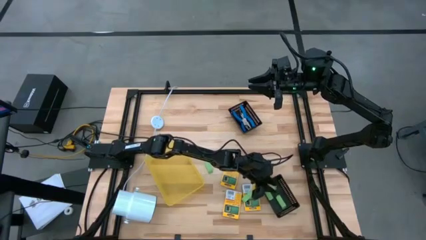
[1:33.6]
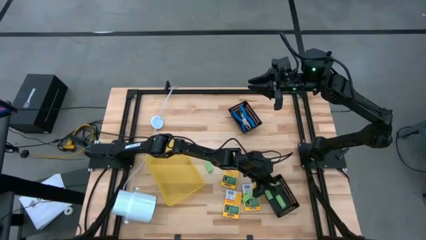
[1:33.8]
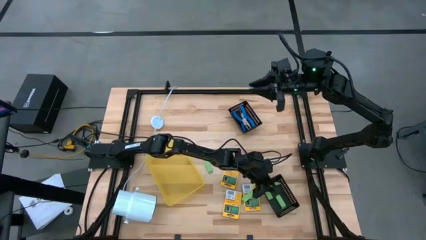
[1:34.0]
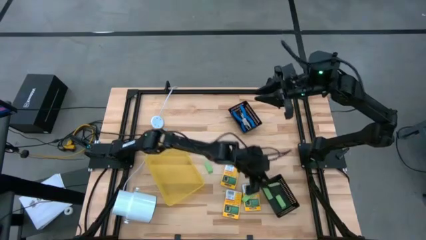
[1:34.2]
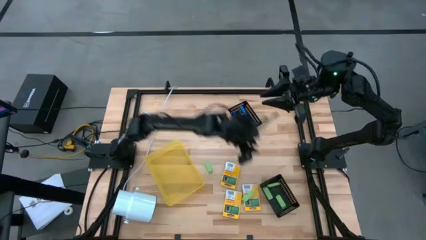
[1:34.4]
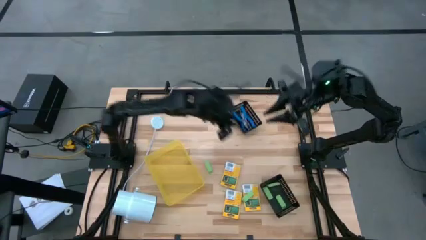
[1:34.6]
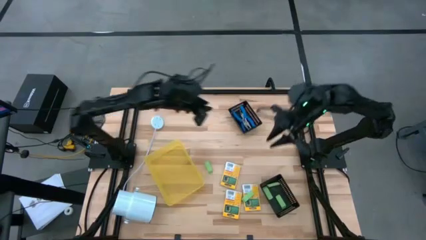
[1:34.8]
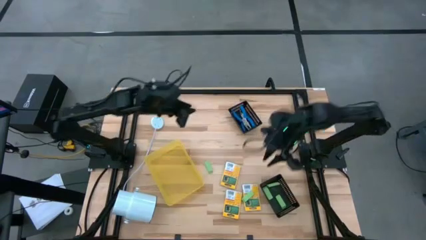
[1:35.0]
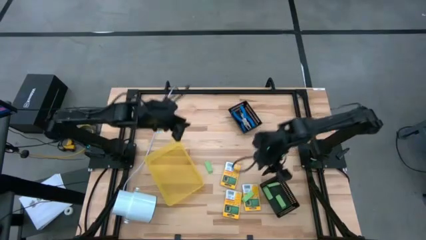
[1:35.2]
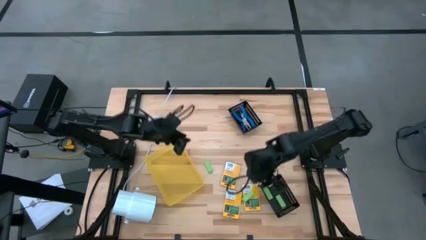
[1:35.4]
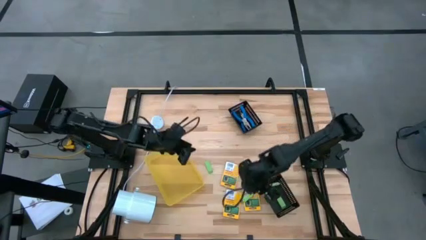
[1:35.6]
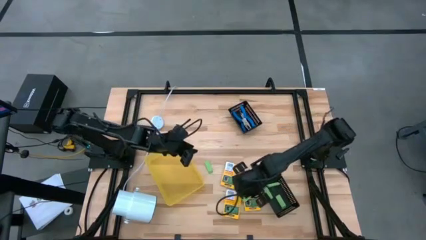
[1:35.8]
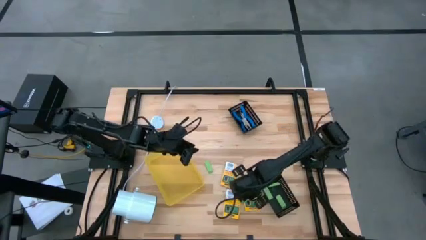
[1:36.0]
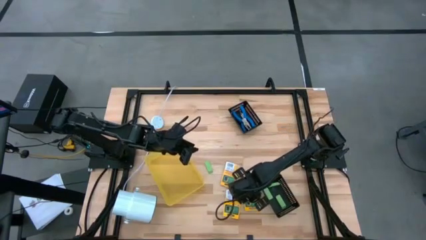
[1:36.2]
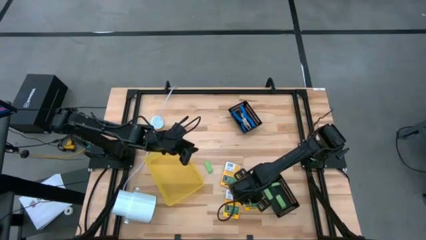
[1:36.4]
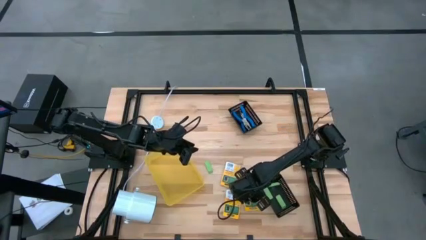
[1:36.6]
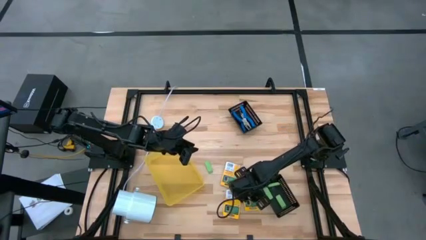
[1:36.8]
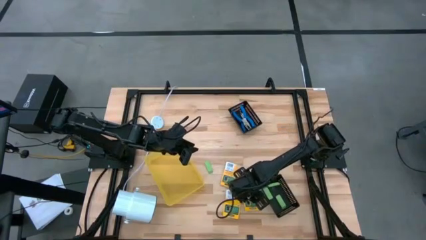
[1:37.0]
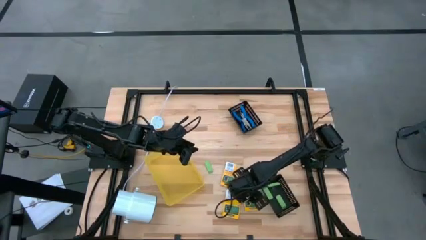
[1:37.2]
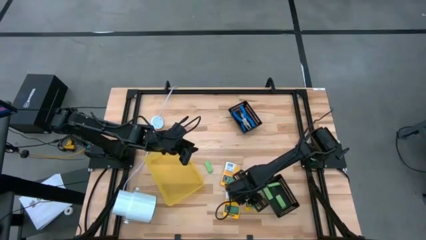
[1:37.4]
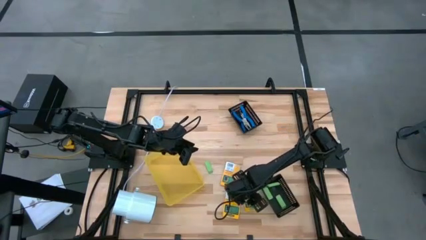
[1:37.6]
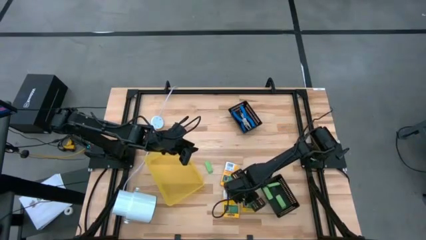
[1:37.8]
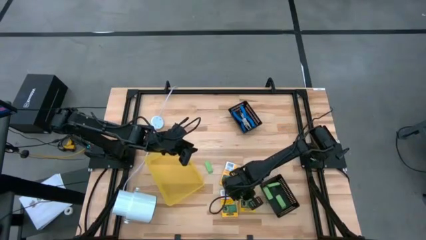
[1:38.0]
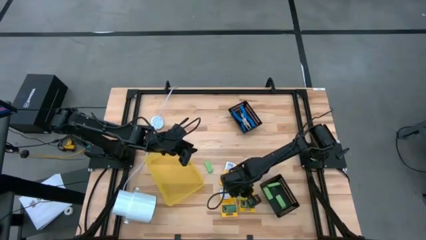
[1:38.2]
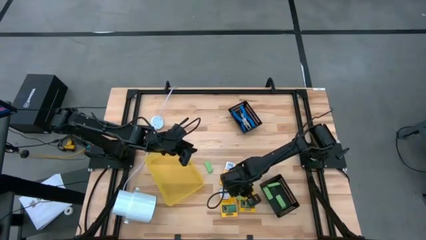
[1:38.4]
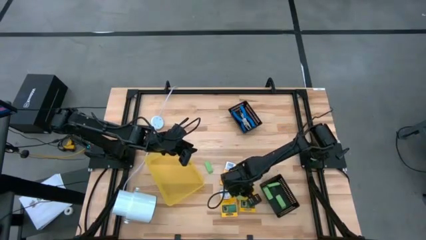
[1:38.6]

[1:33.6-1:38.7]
Task: Pick & Place School Supplies
Put the green eraser into the bottom black bin

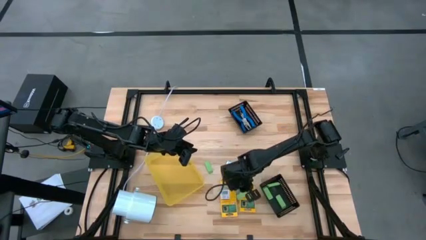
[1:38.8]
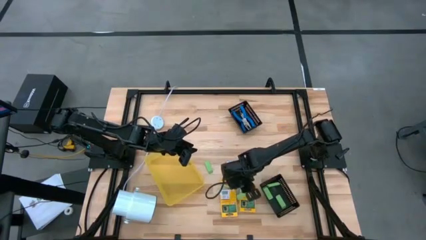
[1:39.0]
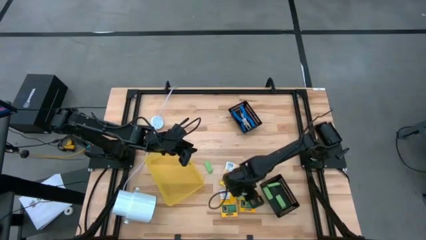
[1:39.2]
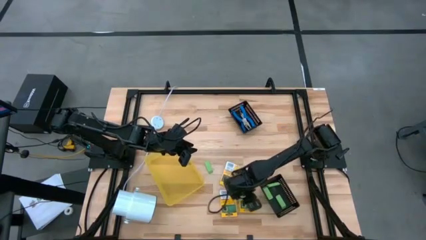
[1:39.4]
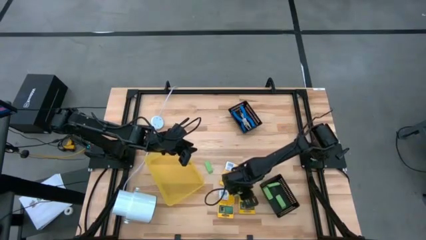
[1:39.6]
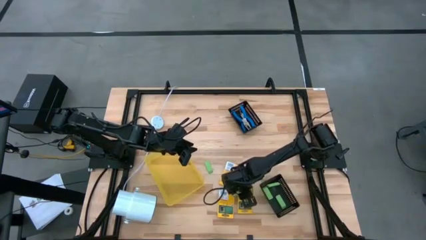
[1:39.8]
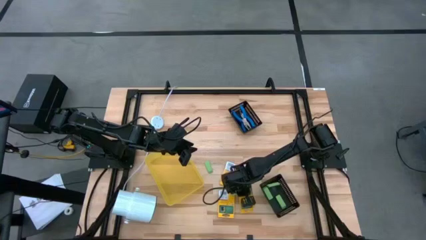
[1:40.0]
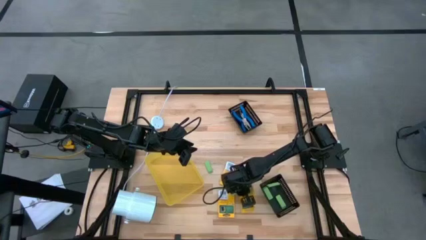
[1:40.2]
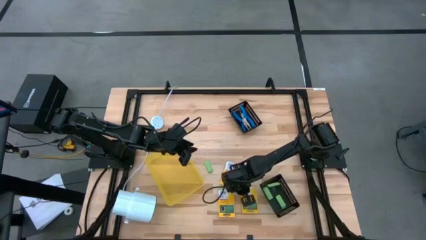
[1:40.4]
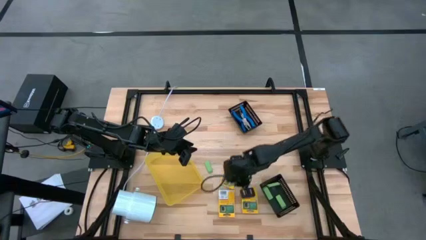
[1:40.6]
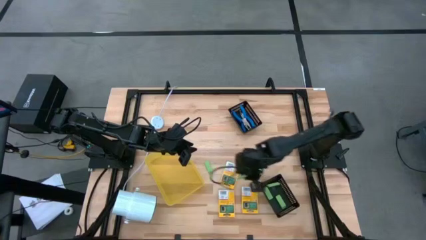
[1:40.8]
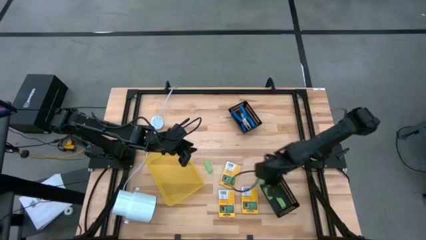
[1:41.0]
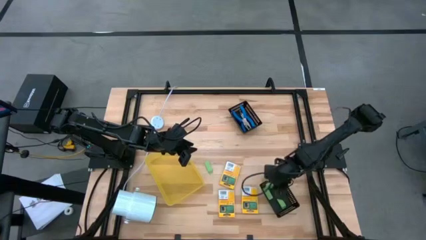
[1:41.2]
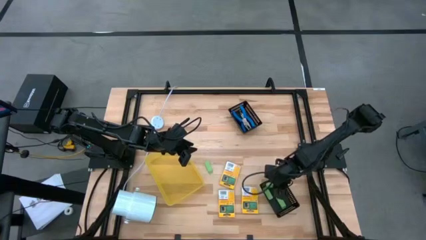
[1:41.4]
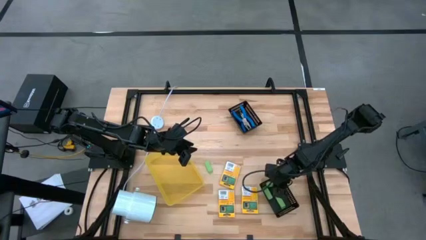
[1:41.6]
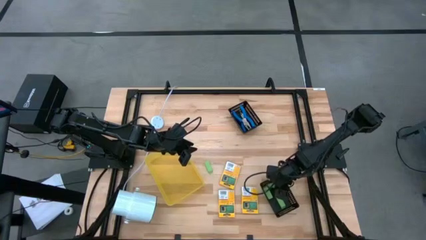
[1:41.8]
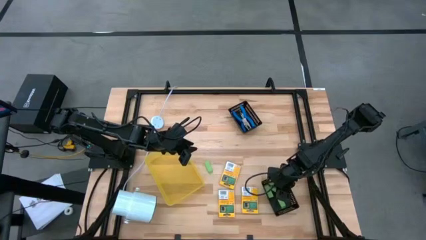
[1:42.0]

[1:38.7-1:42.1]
Put the green eraser into the bottom black bin

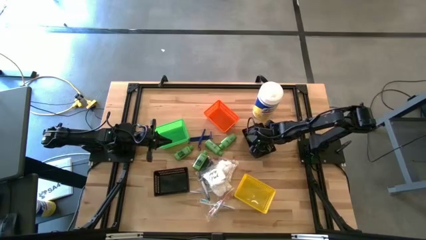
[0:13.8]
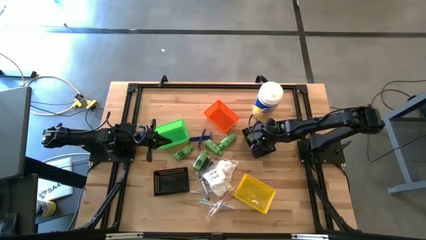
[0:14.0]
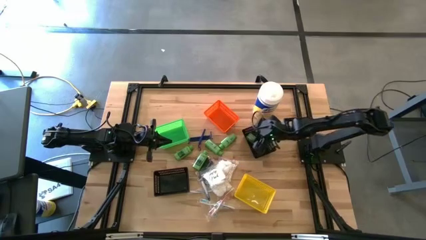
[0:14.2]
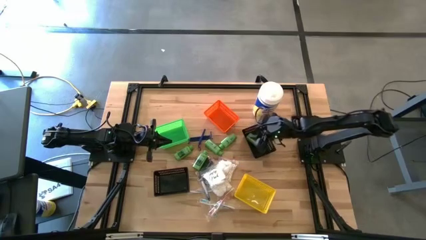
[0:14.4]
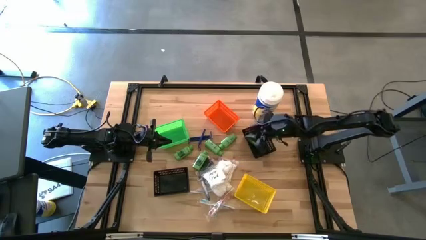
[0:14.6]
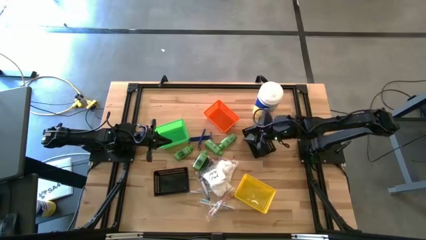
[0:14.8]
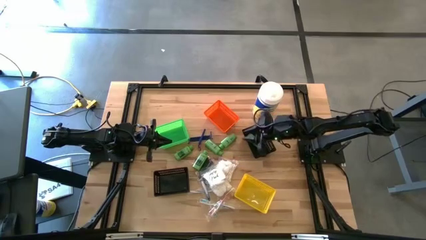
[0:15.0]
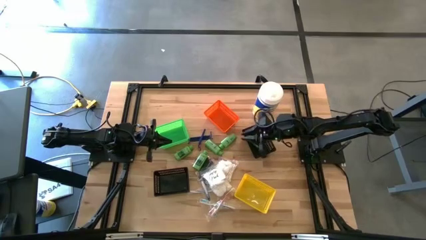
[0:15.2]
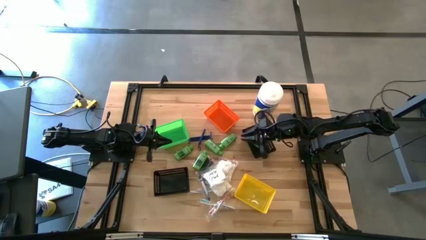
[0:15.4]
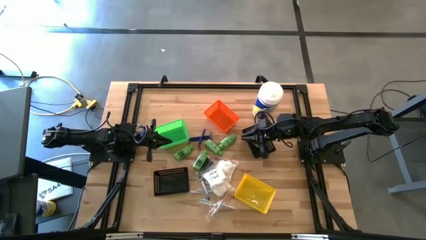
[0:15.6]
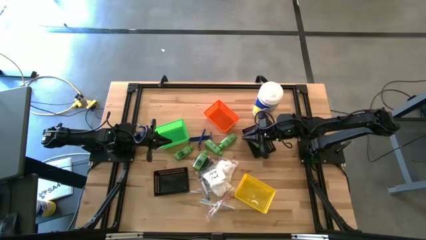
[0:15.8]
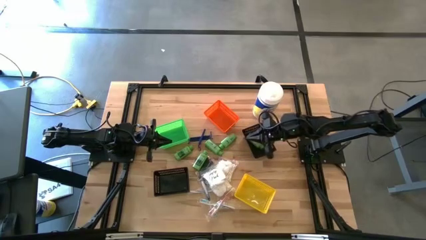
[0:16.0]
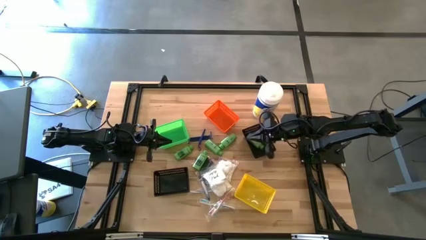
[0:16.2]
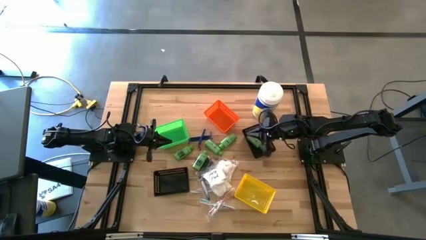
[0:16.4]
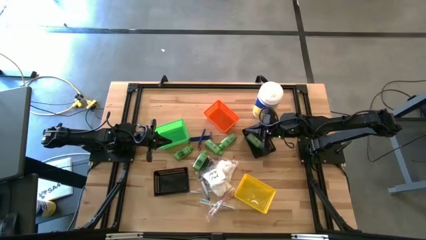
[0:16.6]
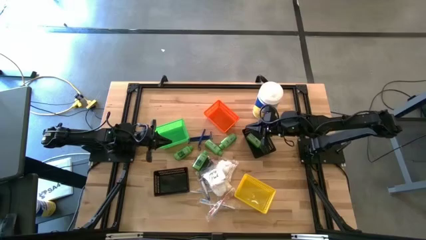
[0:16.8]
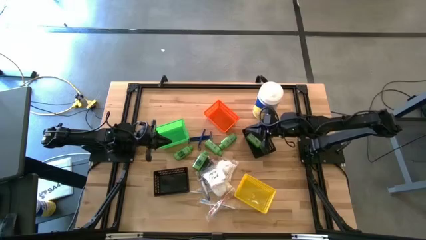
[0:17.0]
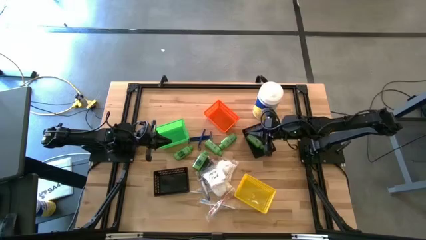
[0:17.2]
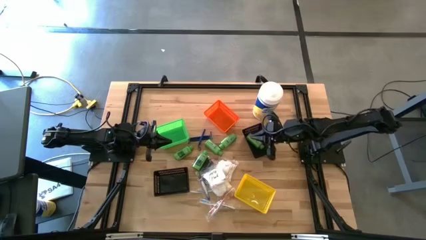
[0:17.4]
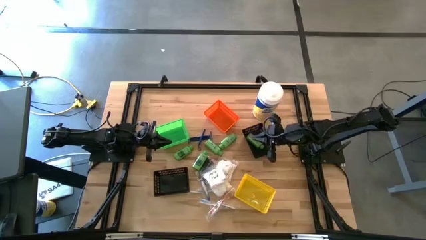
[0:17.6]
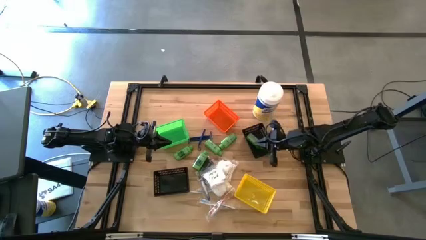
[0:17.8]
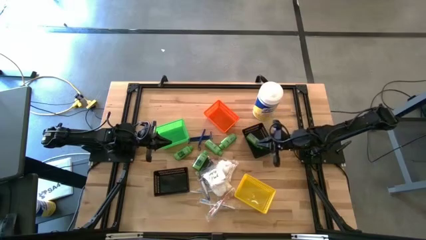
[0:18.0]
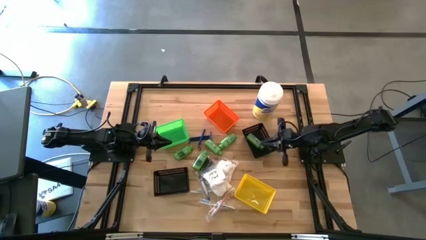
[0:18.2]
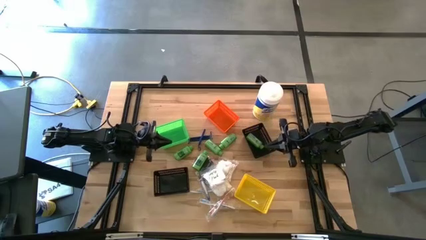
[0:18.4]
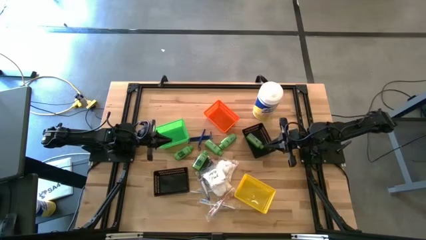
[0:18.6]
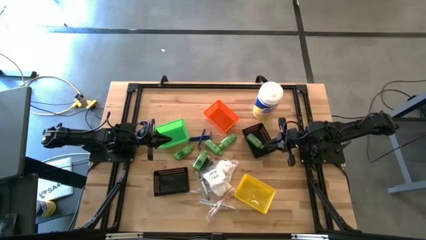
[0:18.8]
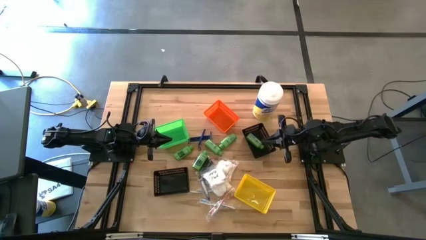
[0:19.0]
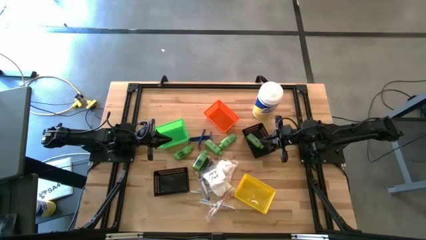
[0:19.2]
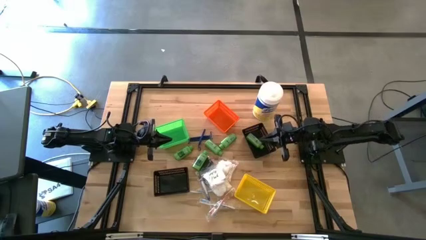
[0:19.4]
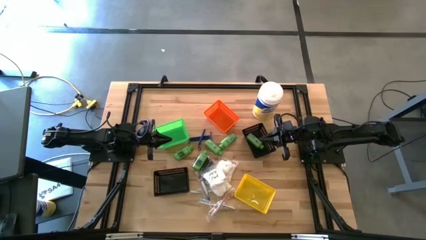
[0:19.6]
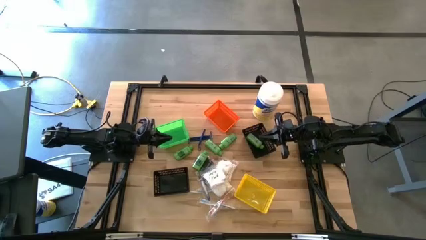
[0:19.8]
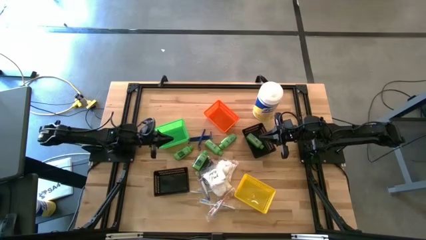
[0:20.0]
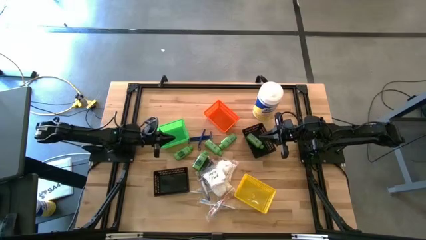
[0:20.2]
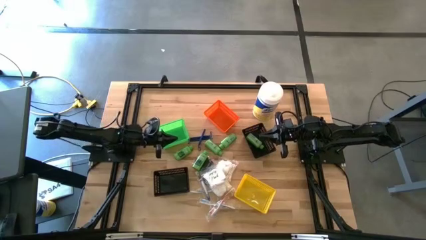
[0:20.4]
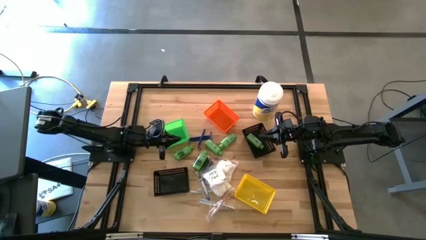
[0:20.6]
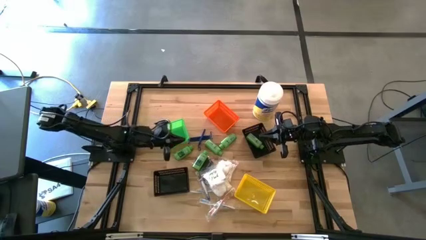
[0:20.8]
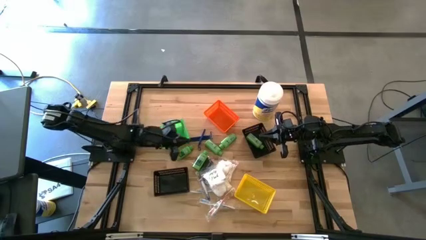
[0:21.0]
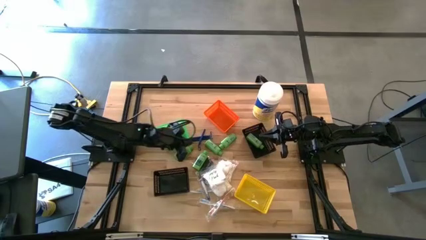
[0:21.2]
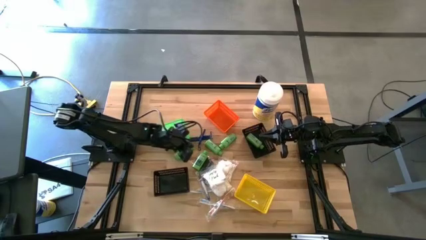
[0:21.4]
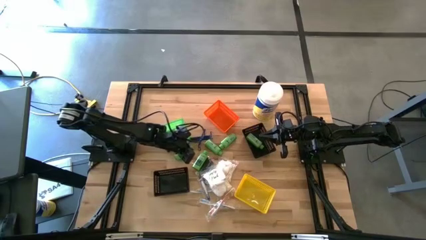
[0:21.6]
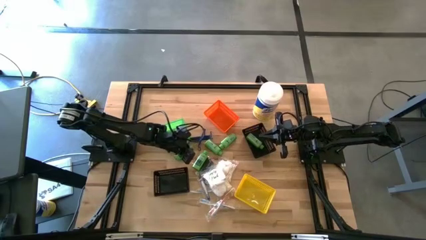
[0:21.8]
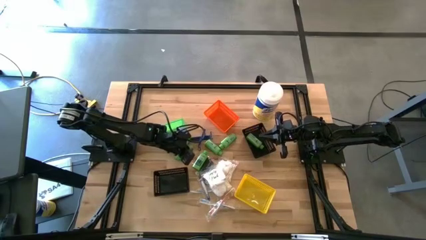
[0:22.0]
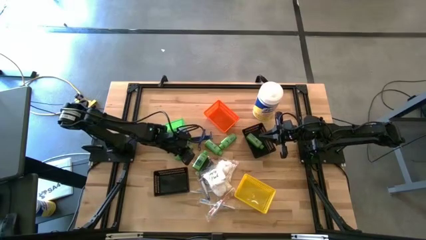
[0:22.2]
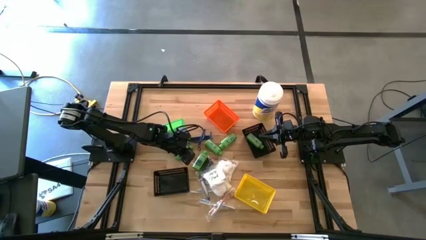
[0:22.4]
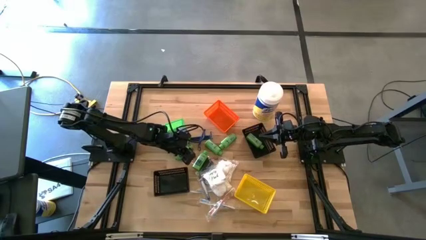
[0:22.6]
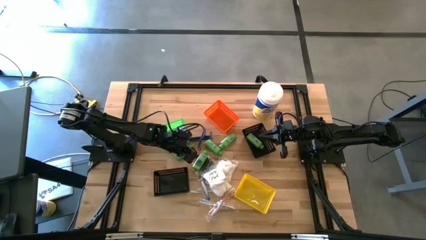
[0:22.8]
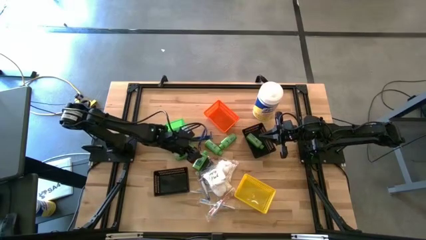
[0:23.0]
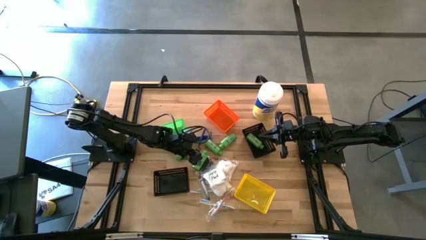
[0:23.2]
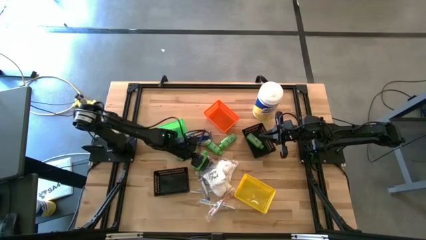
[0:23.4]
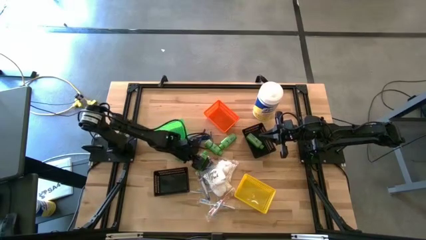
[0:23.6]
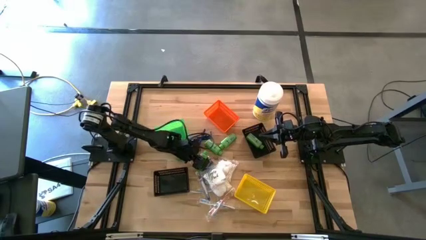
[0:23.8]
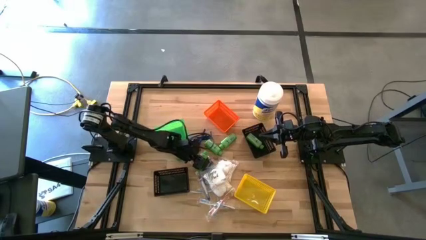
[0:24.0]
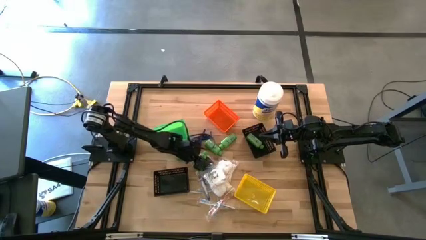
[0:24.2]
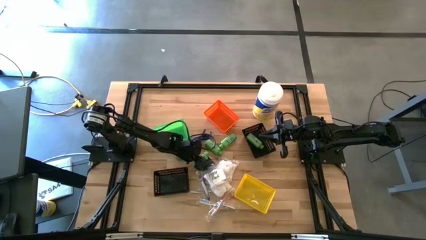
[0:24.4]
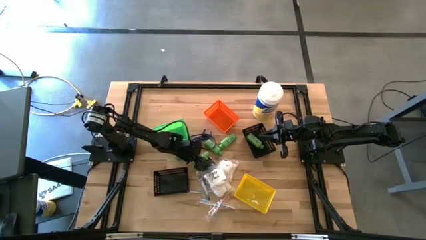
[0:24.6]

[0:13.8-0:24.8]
Task: Pick & Place Travel size toiletries
Put the green shampoo into the top black bin
